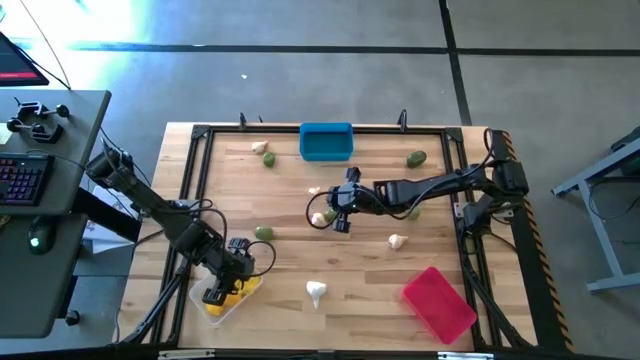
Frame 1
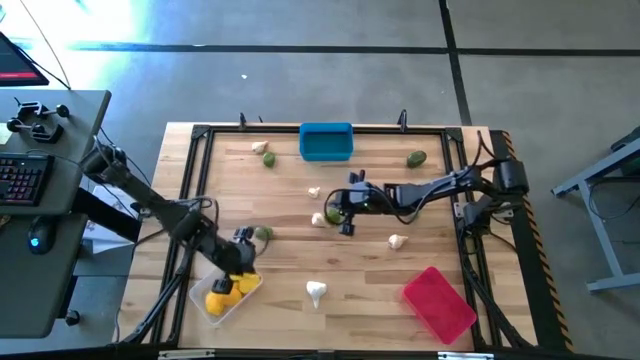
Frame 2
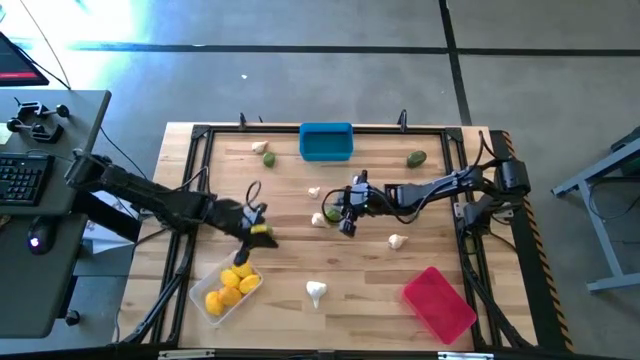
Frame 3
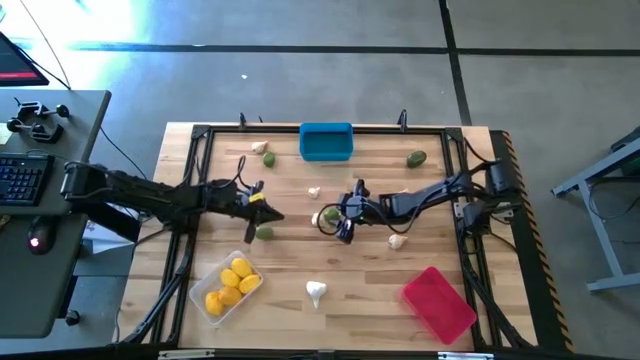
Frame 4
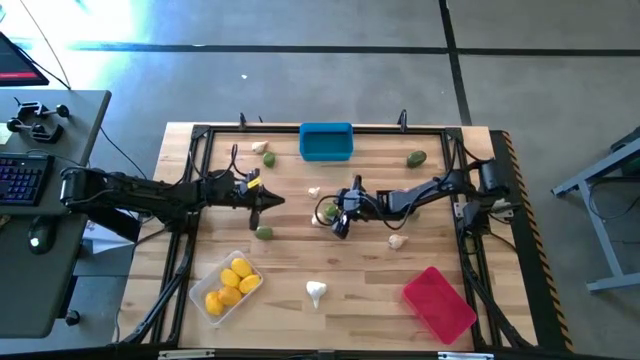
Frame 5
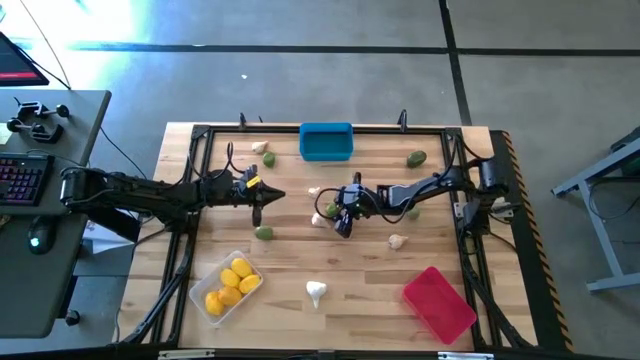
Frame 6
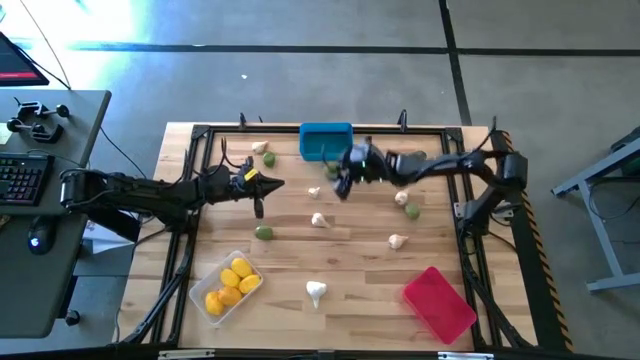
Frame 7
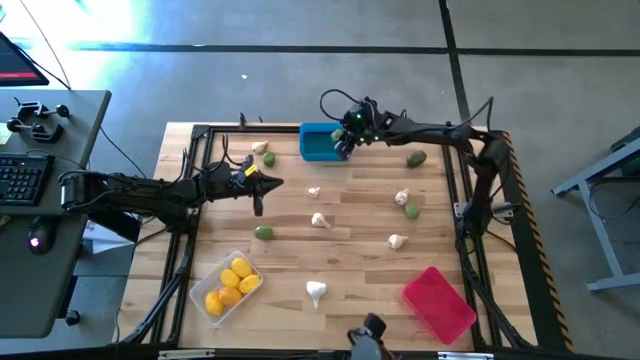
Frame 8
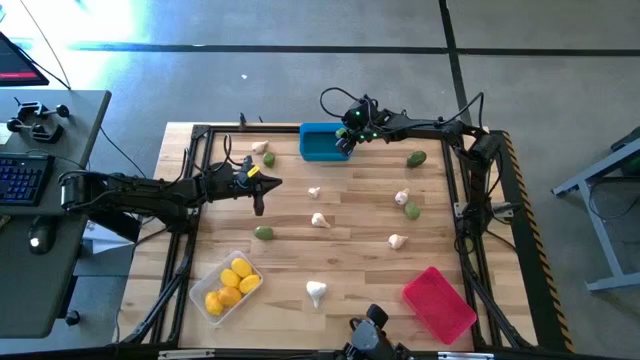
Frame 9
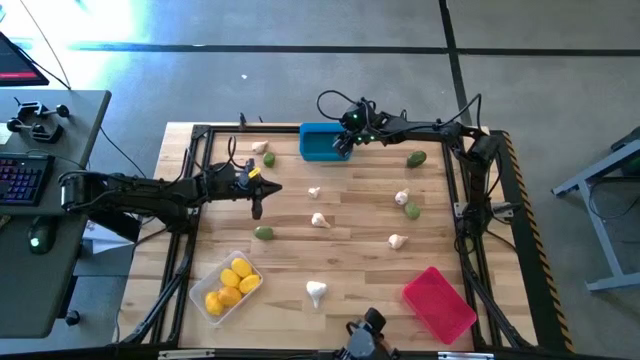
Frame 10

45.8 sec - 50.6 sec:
Task: Sort produce into baskets
Put the lime into the blue bin

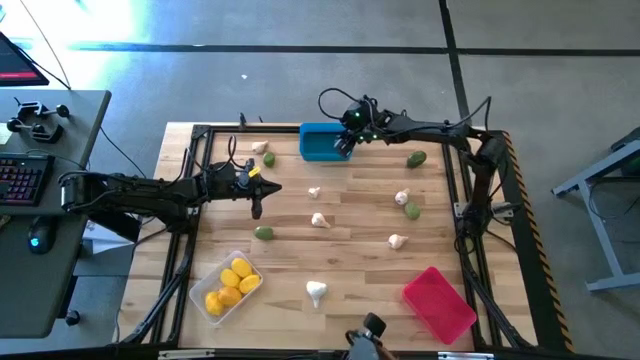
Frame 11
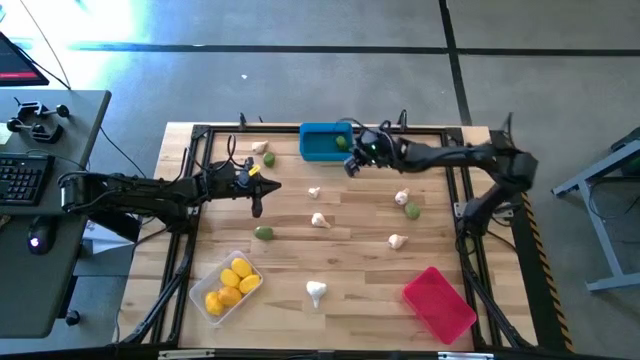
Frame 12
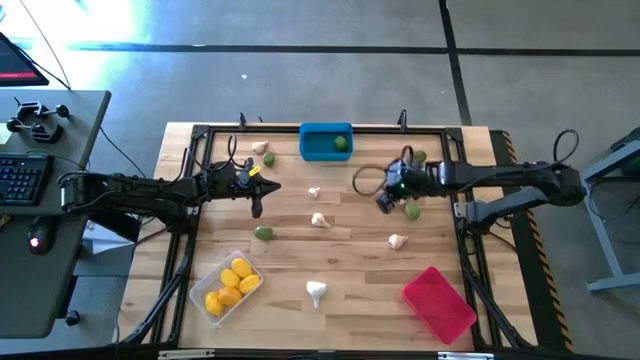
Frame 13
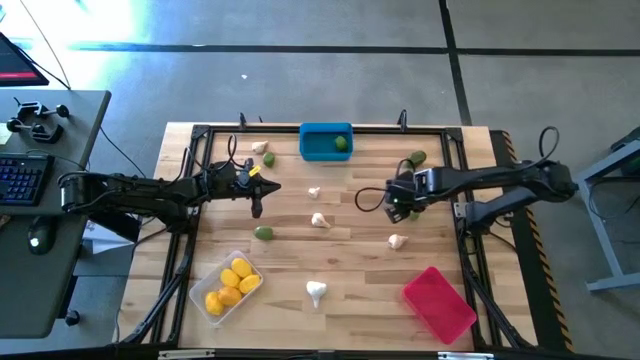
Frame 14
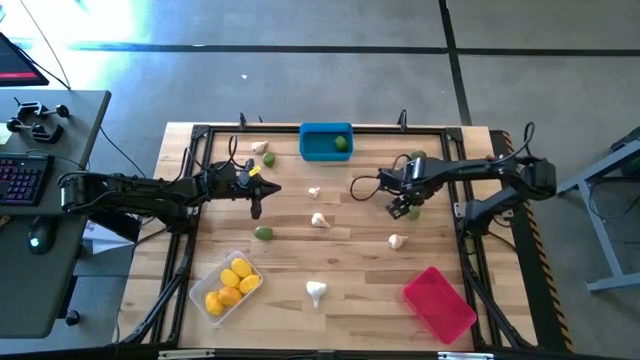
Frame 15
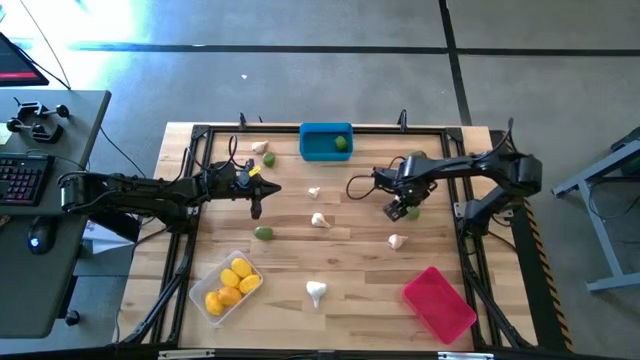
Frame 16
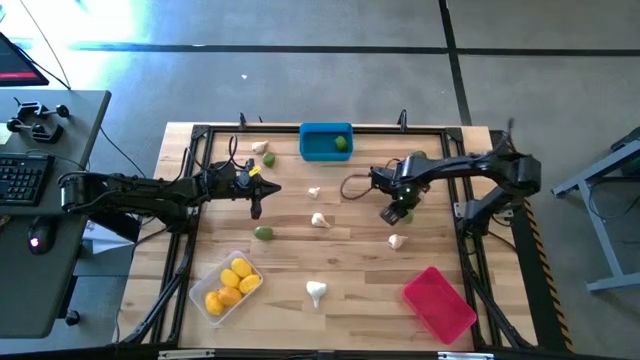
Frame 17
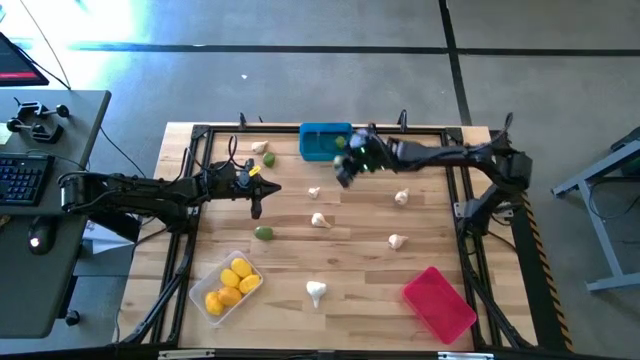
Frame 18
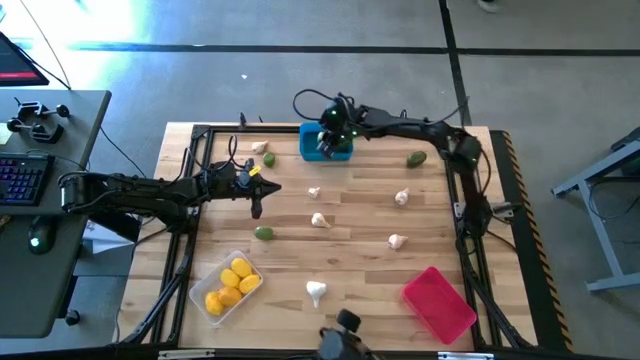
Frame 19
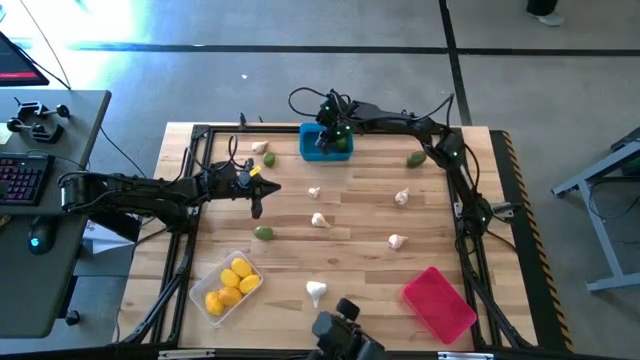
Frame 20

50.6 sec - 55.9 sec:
Put the lime into the blue bin

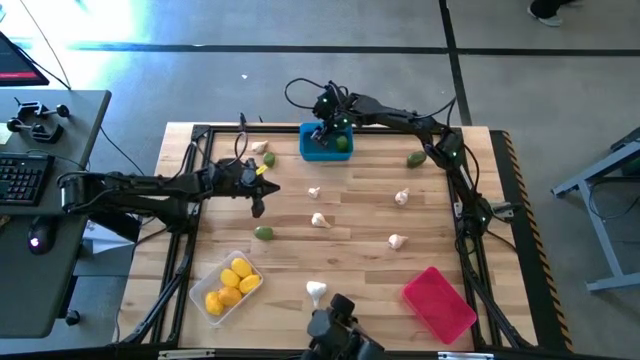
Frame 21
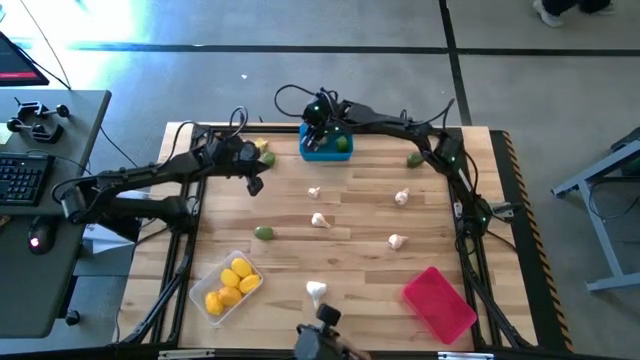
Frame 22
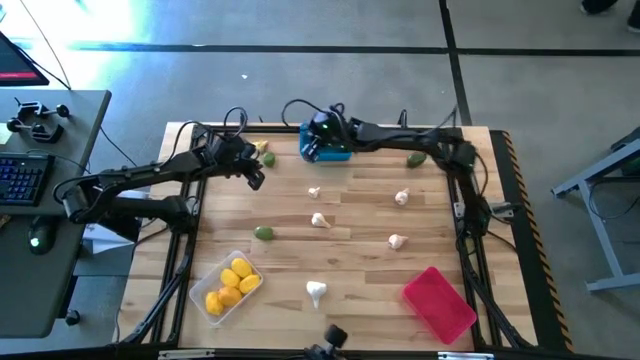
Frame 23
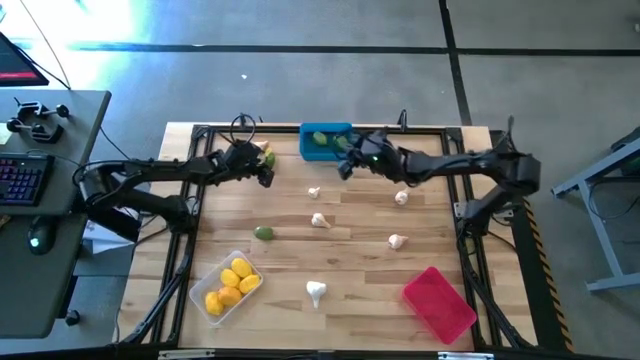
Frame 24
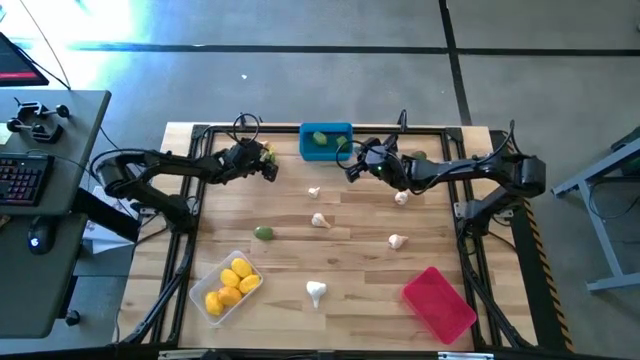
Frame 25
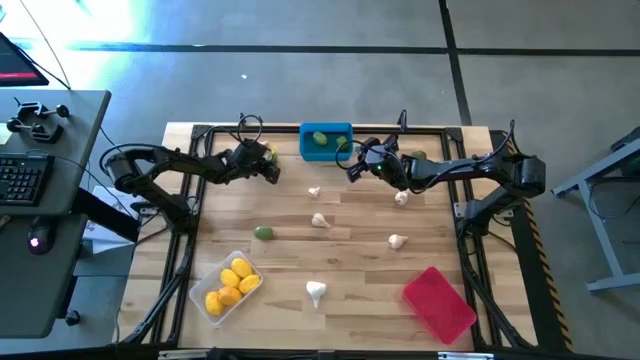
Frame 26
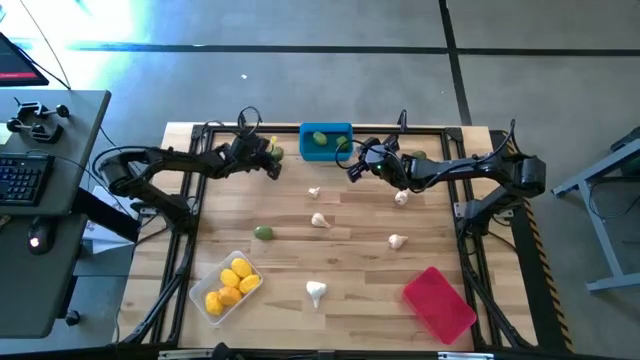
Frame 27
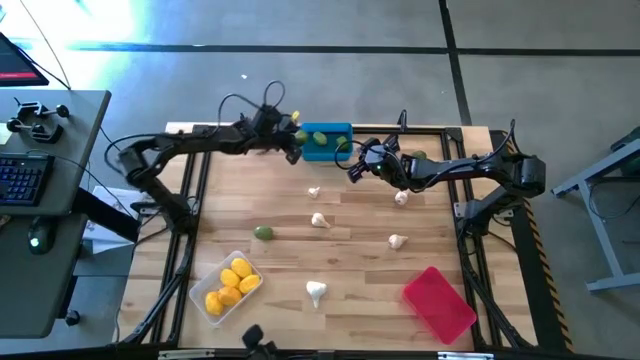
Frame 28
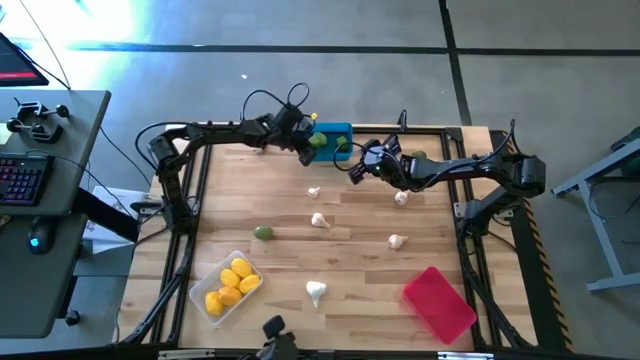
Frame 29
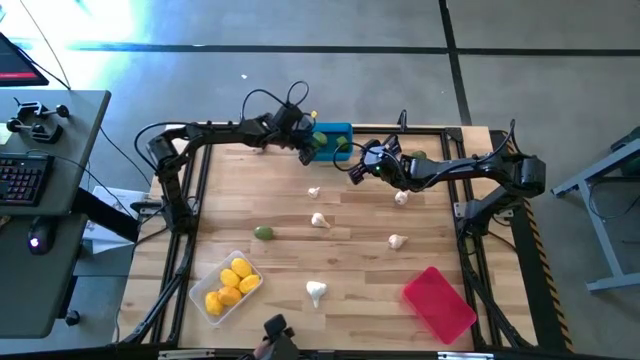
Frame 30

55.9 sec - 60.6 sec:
Put the lime into the blue bin

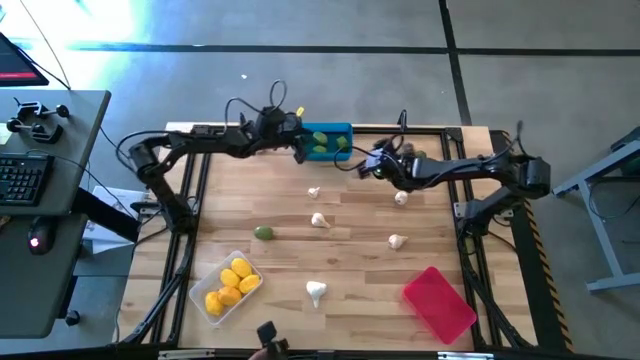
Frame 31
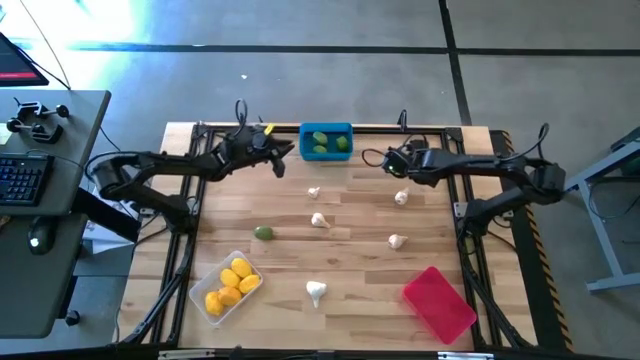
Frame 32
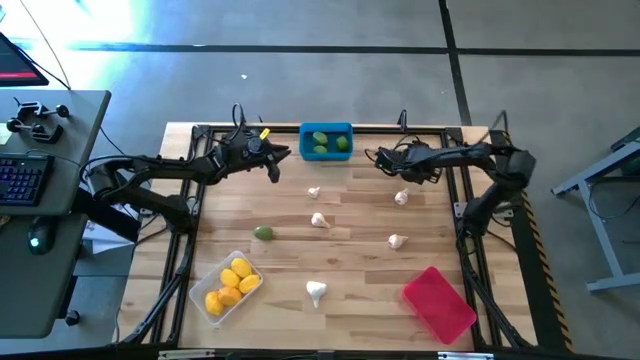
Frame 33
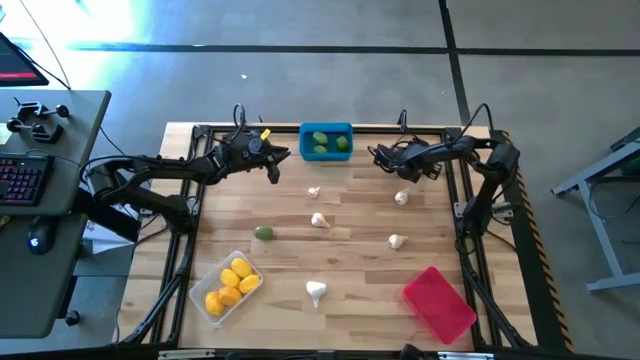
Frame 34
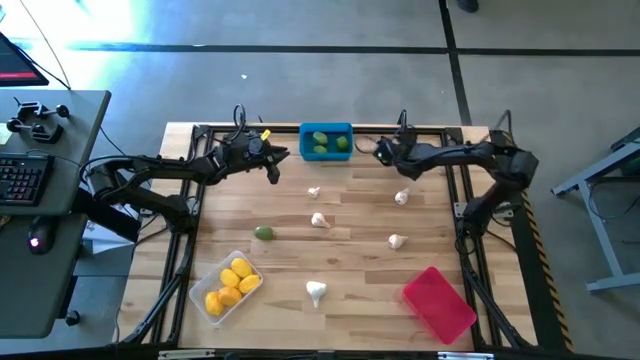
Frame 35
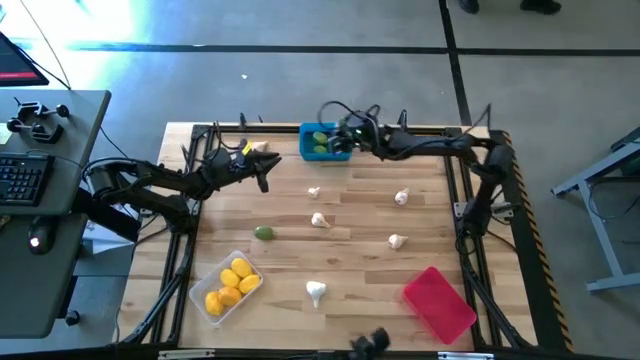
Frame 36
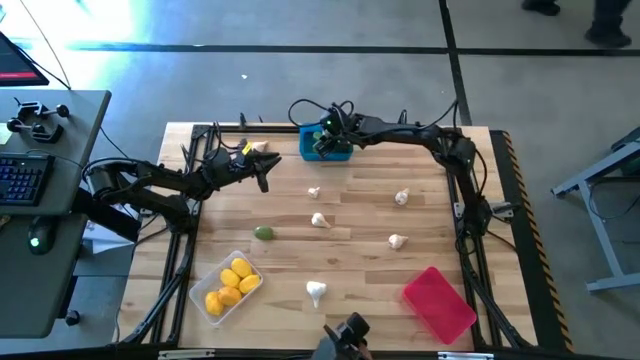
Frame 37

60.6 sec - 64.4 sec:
Put the lime into the blue bin

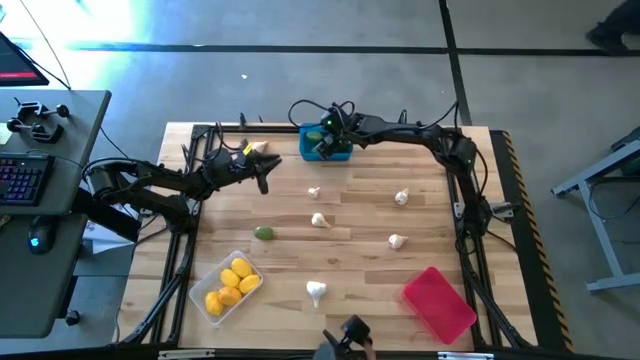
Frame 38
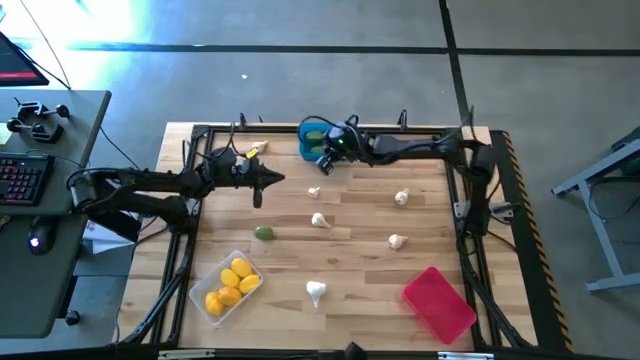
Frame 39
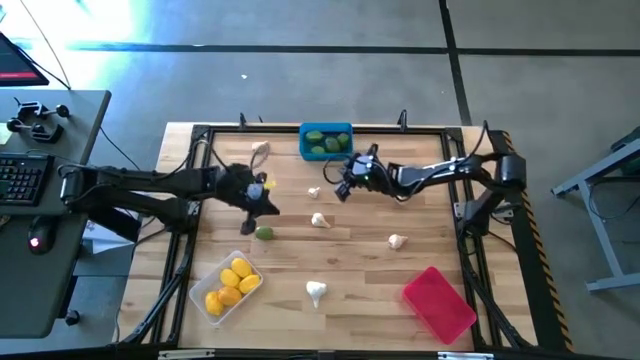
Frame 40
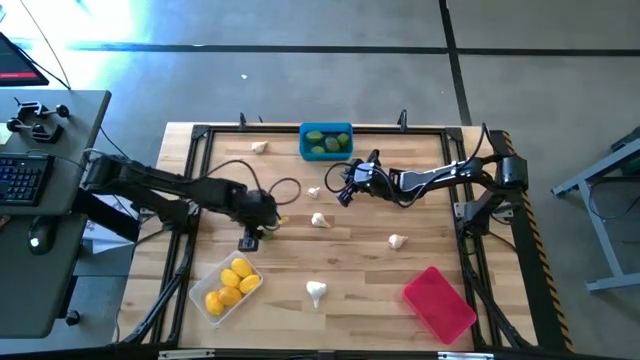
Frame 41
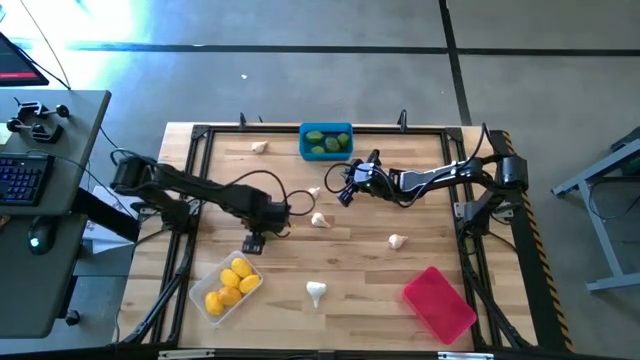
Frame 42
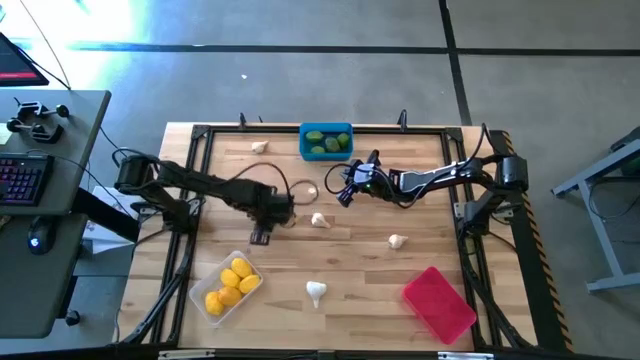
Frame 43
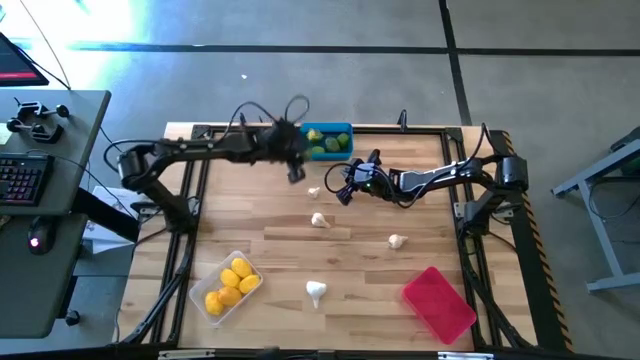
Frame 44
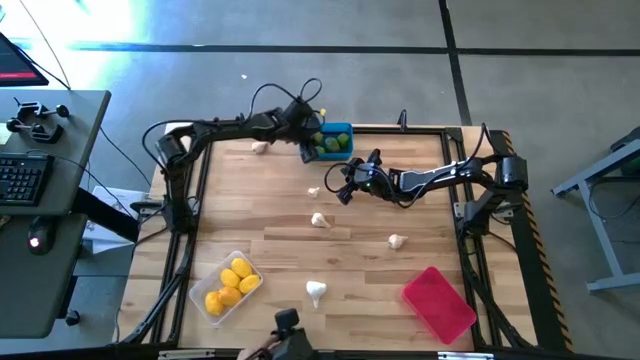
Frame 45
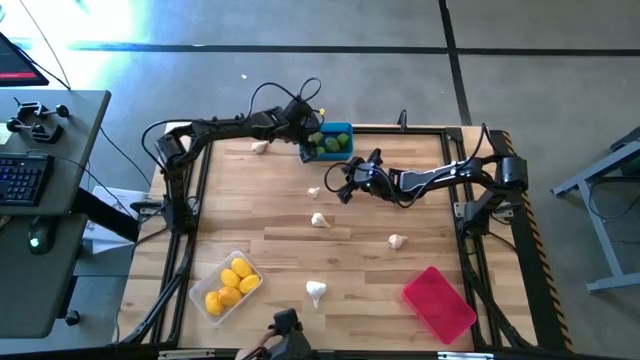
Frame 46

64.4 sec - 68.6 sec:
Put the lime into the blue bin
